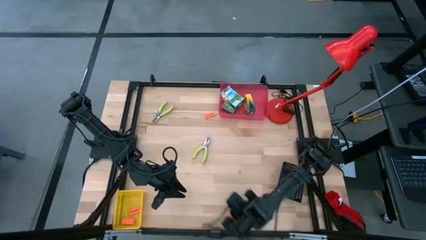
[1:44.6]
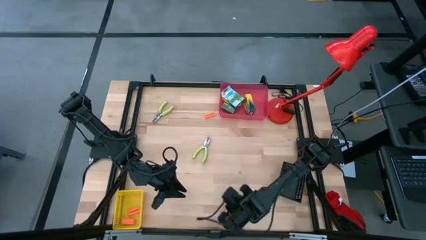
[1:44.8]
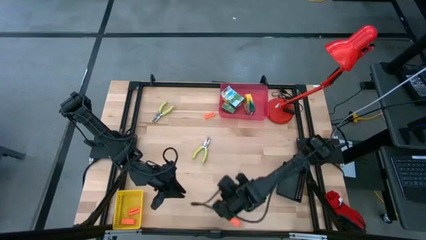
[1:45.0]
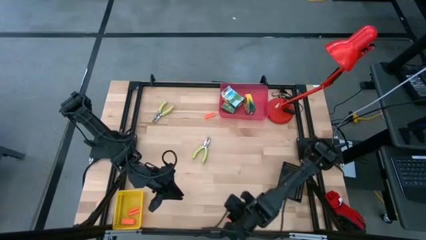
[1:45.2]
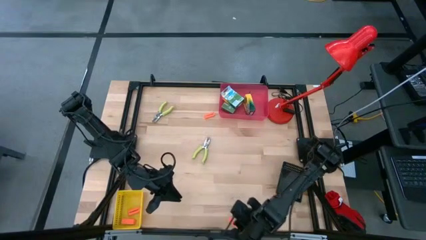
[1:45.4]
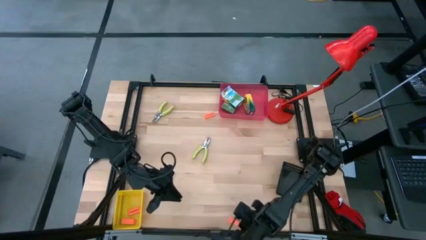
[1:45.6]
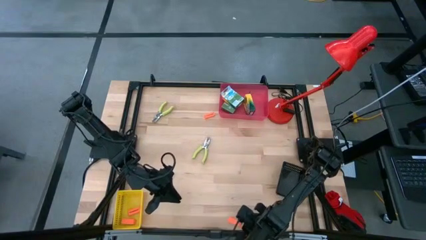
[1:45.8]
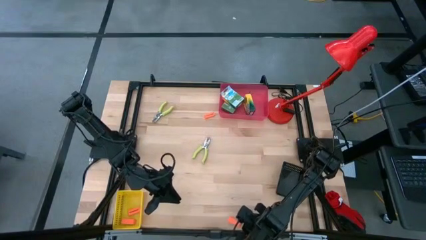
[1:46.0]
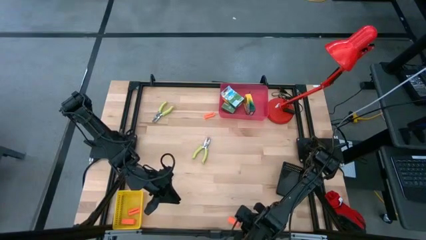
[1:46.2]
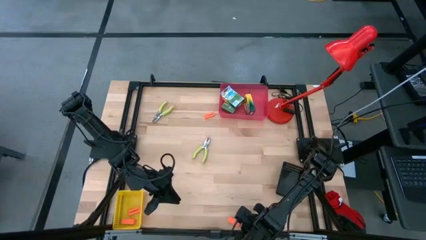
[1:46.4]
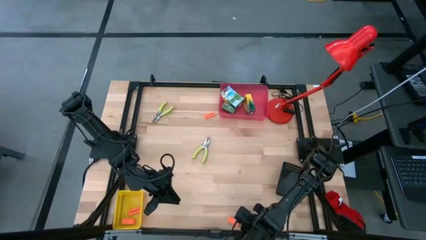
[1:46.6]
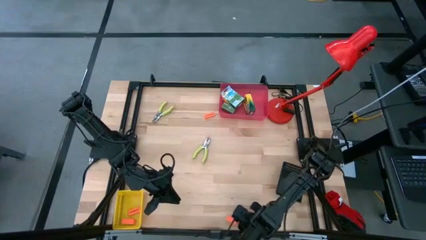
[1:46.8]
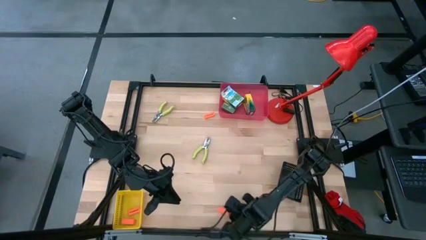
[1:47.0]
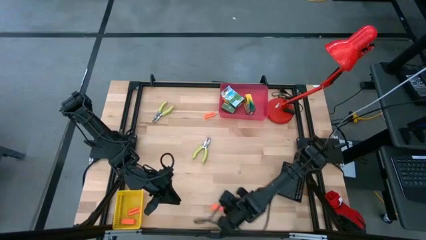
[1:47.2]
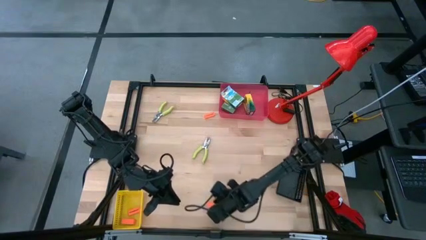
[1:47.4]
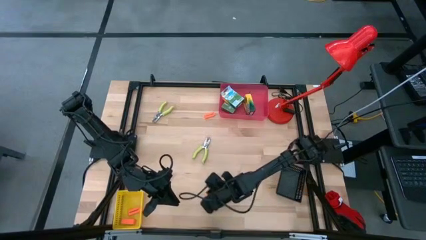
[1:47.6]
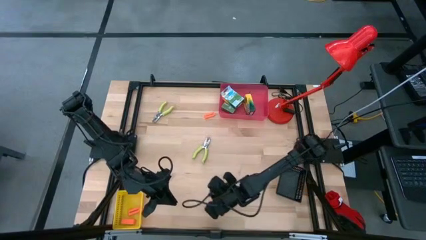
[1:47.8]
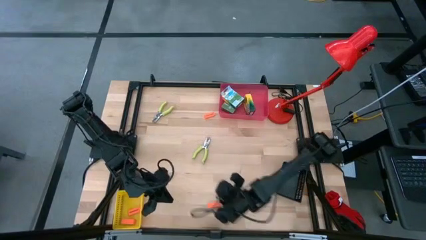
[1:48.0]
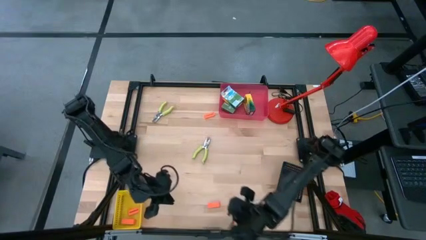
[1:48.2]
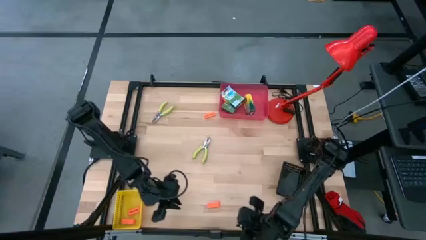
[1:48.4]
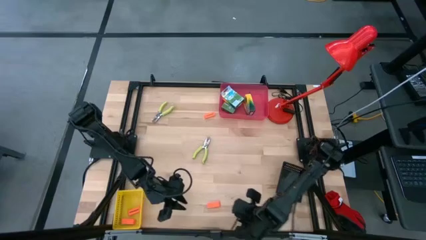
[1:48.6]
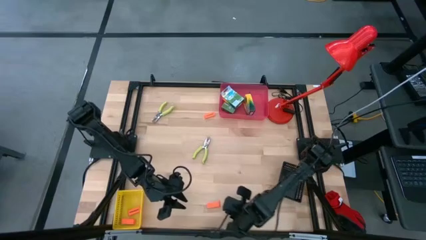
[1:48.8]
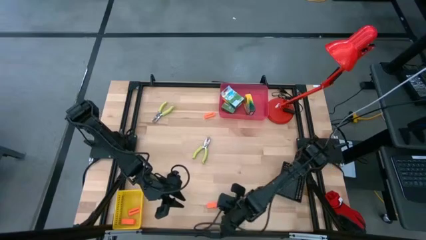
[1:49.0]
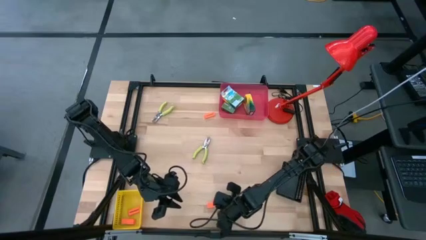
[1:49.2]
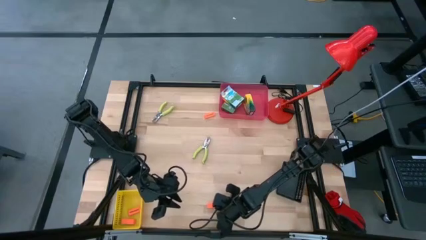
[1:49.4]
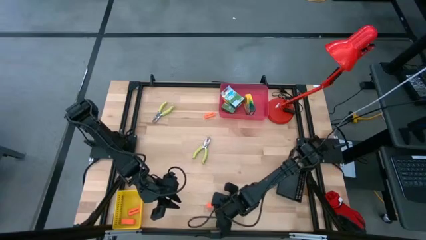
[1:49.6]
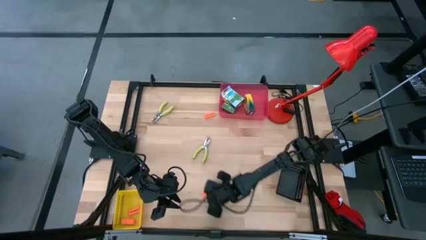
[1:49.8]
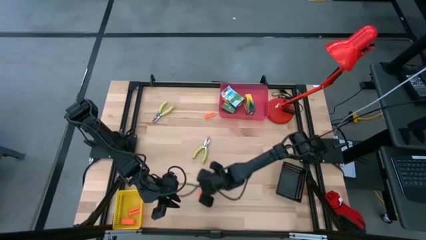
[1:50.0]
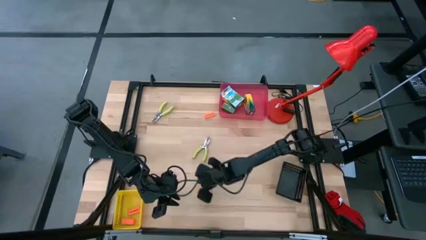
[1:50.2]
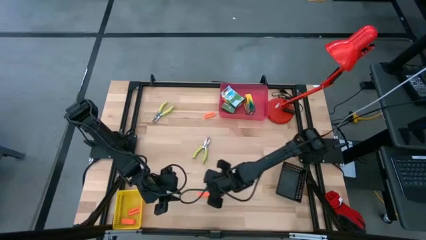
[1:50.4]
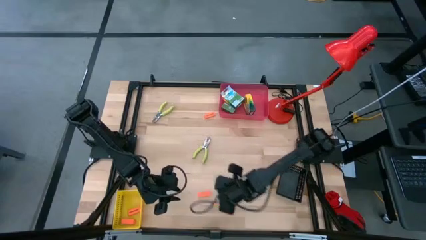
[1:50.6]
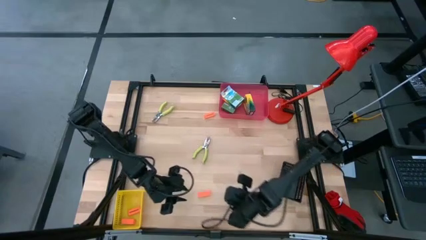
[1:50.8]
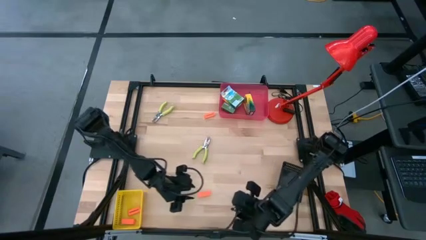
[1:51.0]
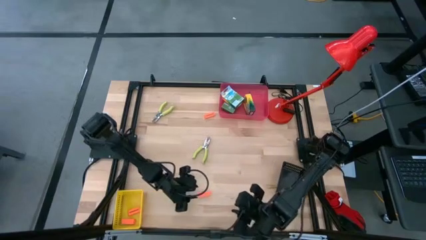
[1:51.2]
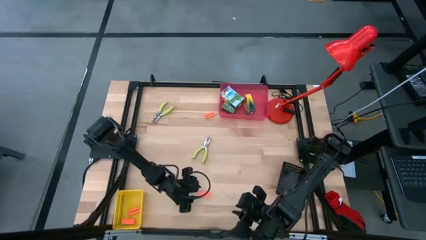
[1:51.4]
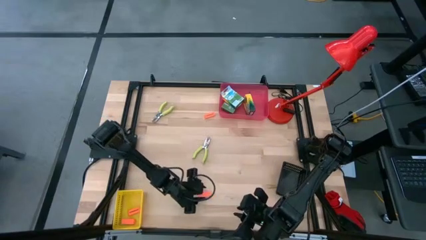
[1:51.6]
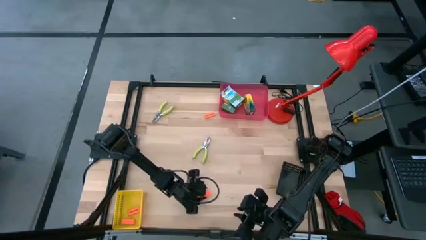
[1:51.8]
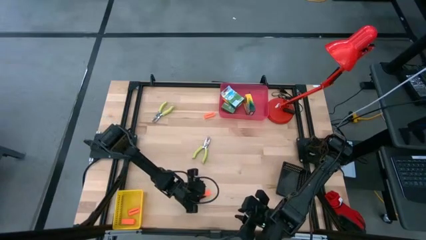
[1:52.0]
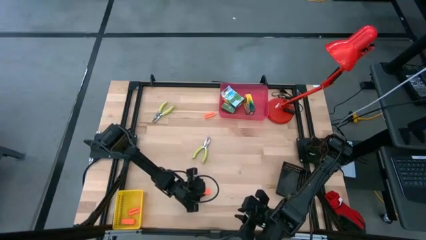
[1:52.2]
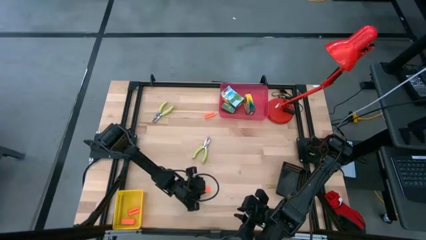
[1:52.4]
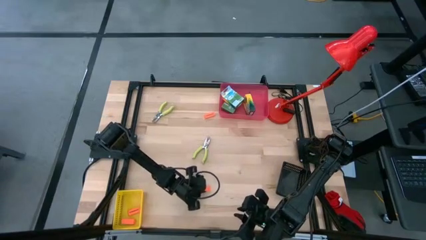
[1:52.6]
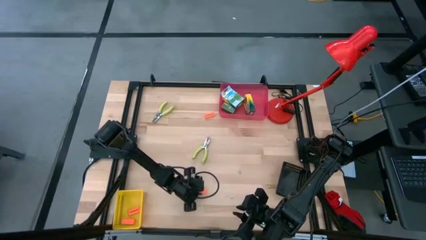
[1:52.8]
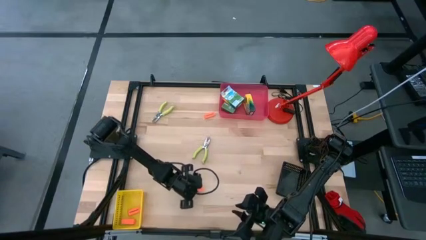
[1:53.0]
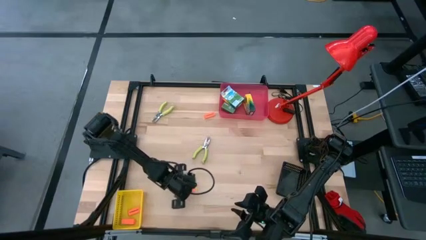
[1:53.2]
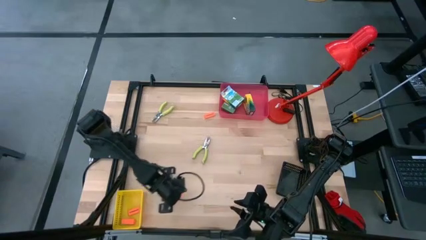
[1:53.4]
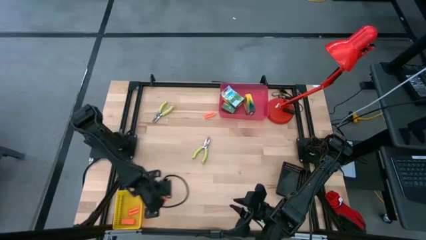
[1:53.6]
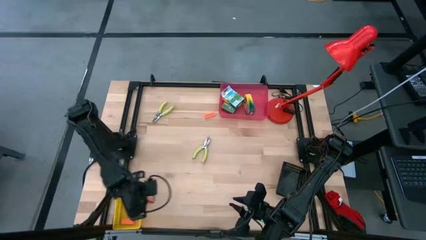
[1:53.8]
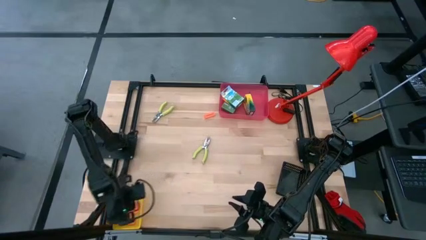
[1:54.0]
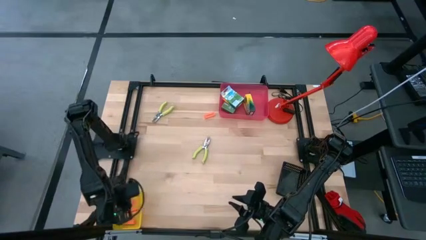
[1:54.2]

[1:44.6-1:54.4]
Task: Pick & Place School Supplies
Put the orange eraser into the yellow bin

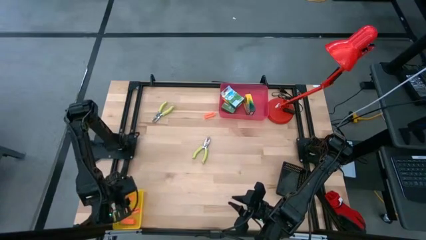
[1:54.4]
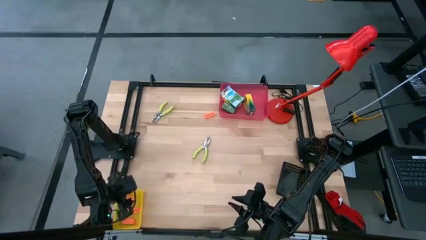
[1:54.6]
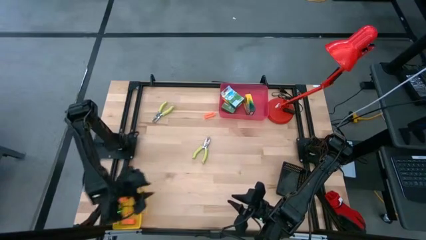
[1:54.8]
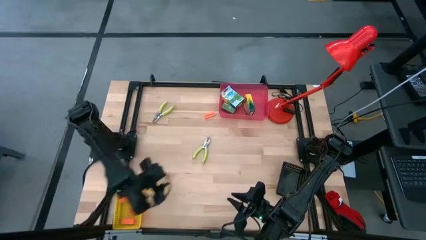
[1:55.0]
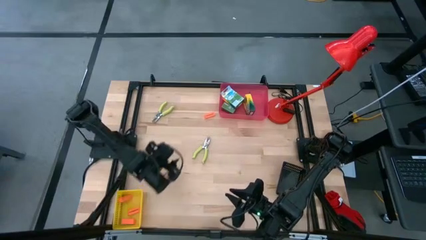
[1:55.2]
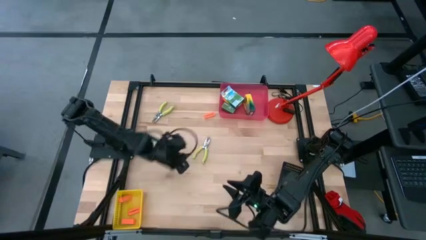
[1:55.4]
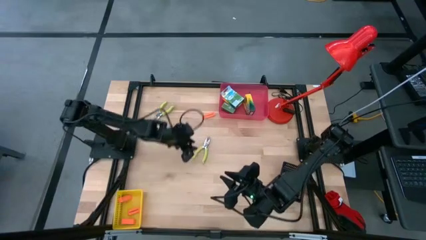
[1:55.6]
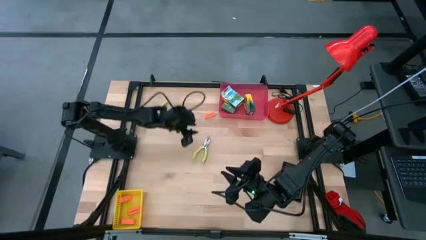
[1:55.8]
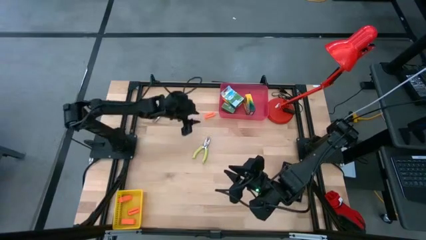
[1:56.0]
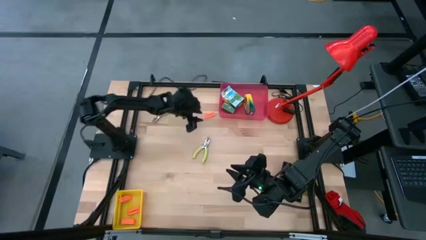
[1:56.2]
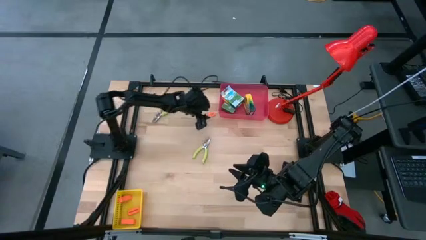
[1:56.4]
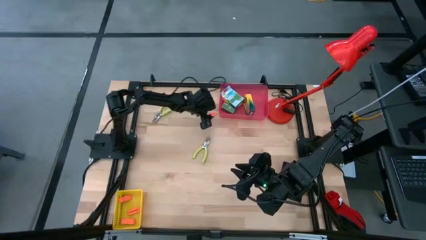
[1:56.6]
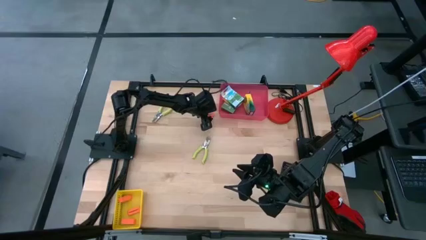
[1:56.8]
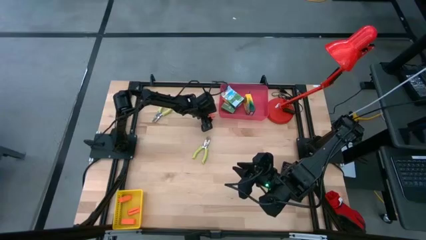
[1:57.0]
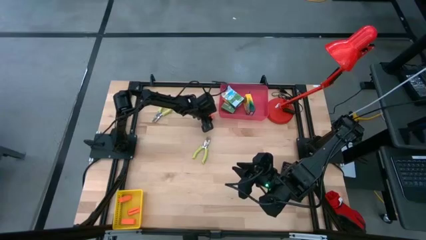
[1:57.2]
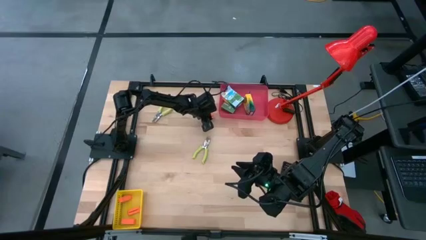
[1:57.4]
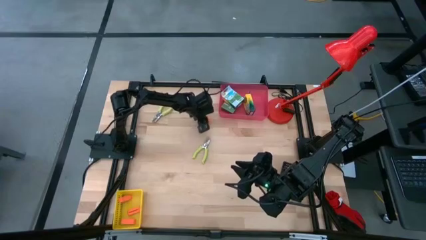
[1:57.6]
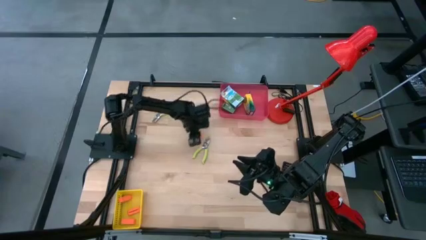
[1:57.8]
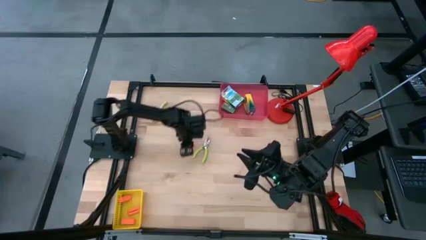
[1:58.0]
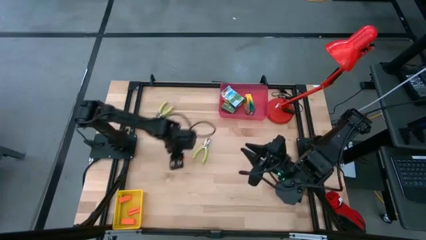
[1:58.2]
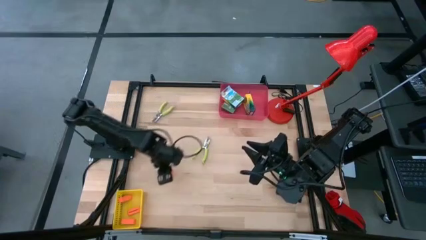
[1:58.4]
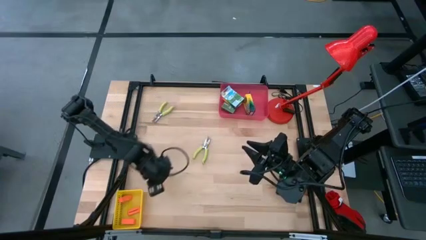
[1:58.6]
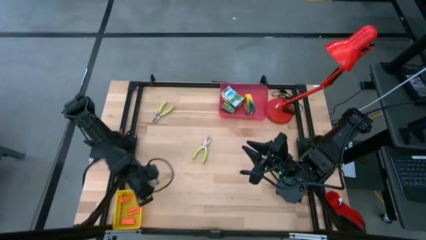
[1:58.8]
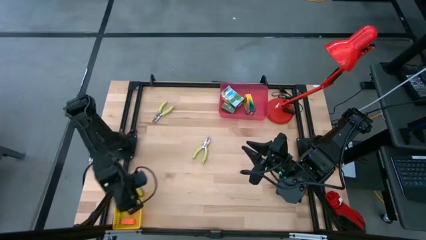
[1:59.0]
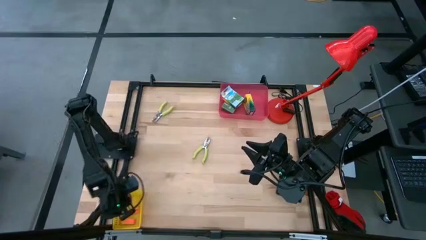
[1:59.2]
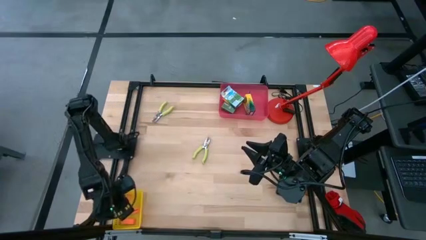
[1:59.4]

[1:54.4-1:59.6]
Put the orange eraser into the yellow bin

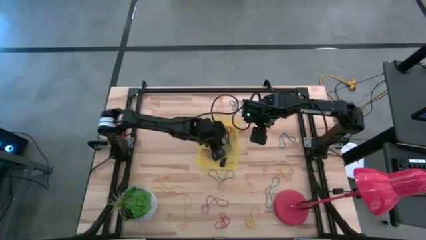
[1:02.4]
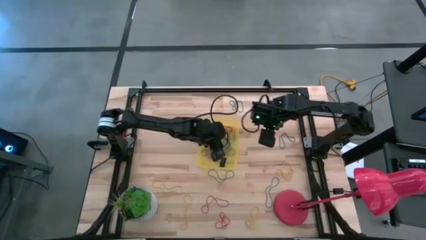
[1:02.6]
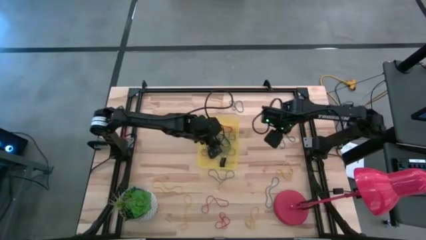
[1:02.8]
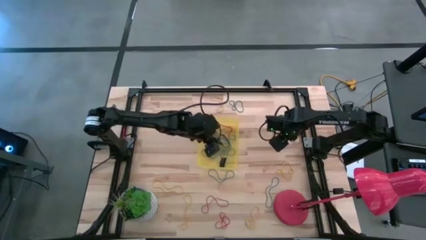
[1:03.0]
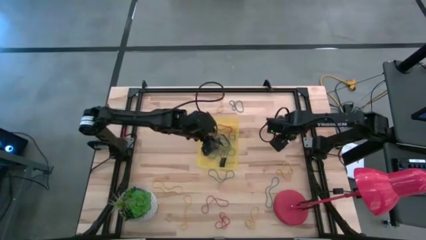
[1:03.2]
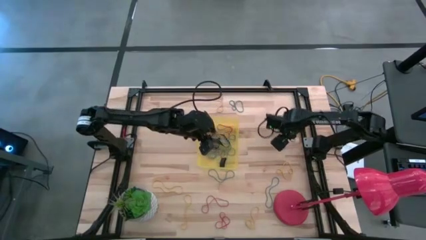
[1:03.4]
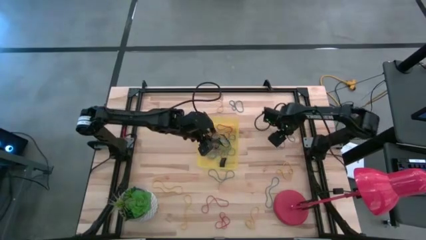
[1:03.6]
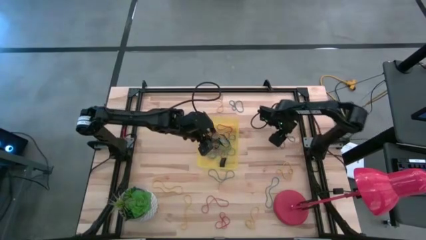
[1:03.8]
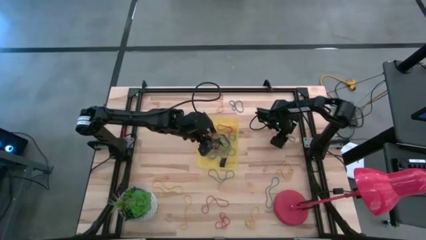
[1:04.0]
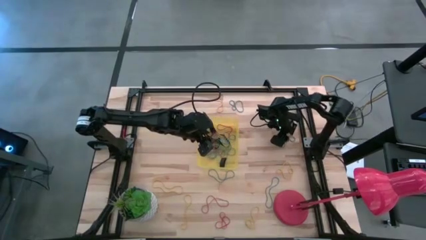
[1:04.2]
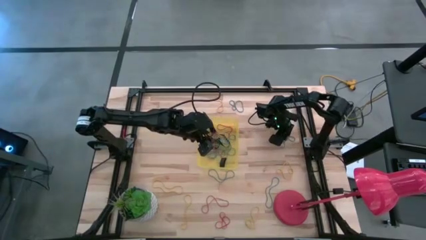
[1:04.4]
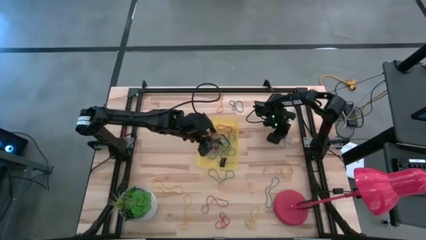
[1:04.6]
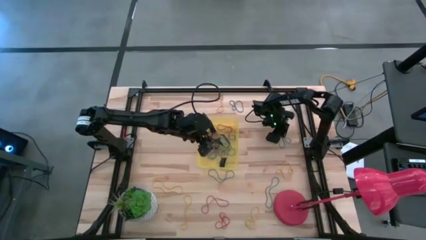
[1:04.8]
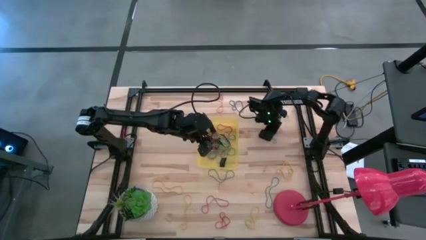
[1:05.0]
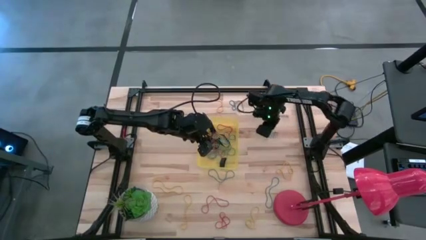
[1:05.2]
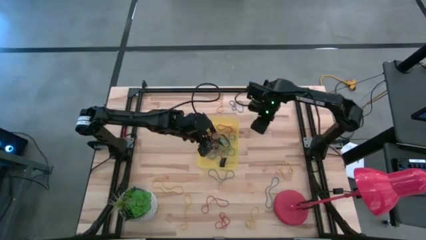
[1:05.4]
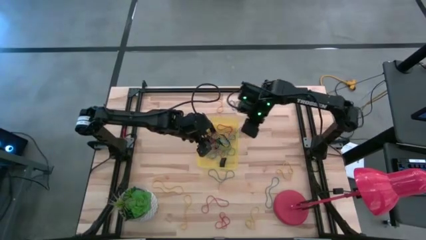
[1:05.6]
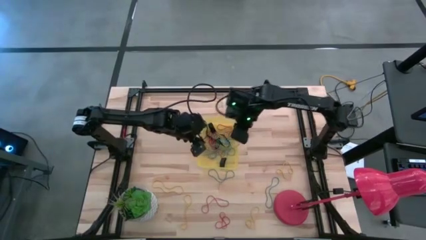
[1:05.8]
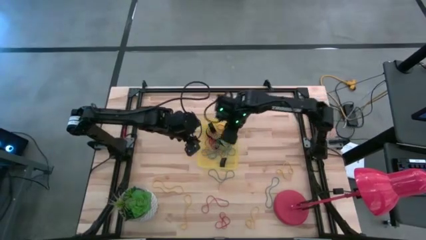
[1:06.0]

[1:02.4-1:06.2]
Task: Pick and place rubber bands into bin
Put the blue rubber band into the yellow bin
